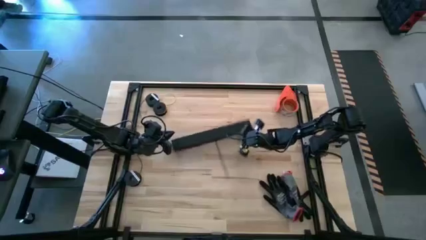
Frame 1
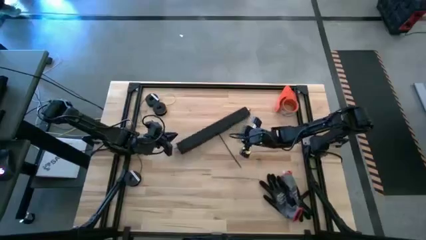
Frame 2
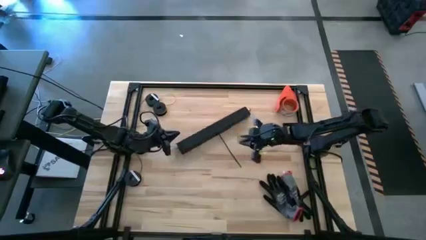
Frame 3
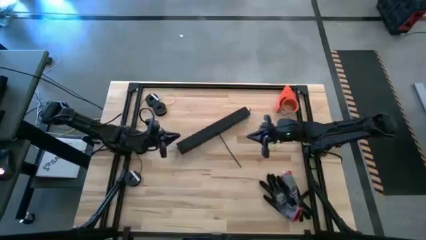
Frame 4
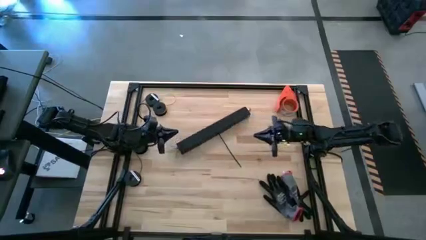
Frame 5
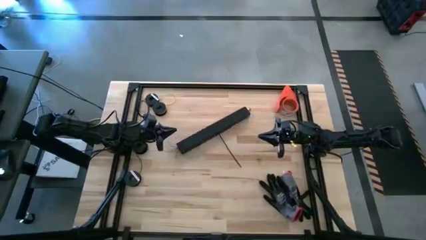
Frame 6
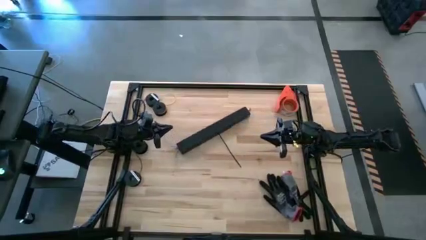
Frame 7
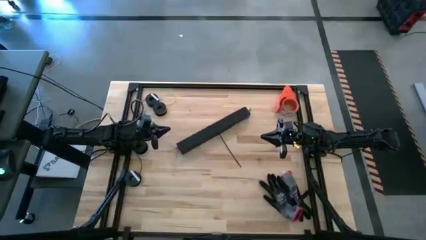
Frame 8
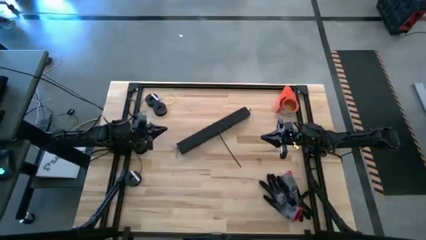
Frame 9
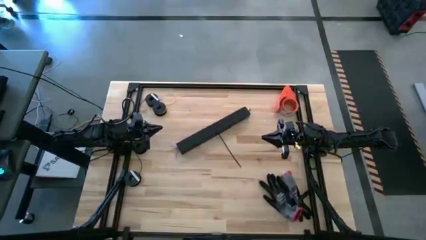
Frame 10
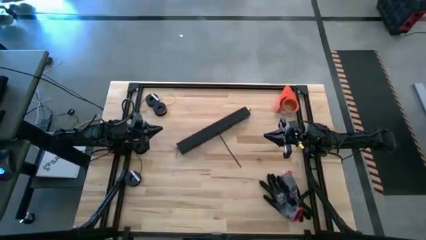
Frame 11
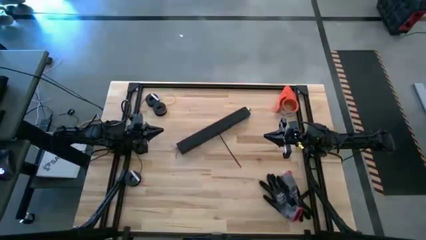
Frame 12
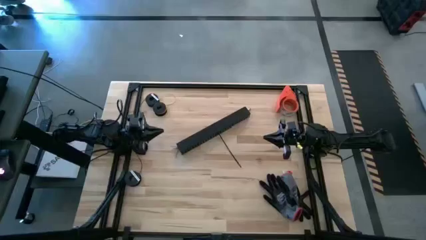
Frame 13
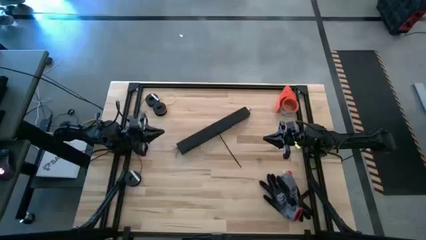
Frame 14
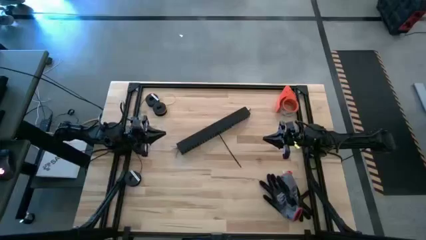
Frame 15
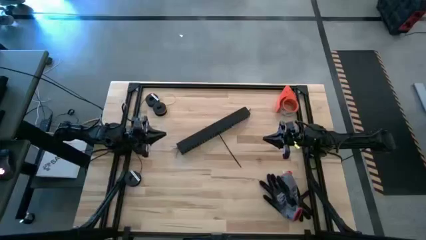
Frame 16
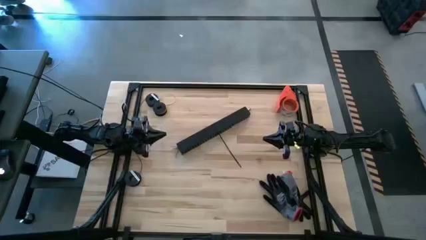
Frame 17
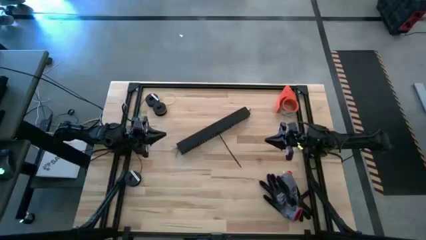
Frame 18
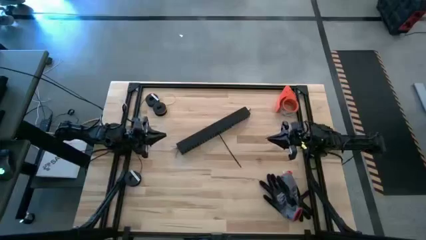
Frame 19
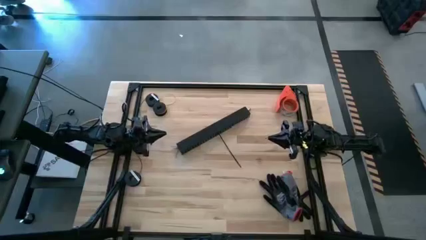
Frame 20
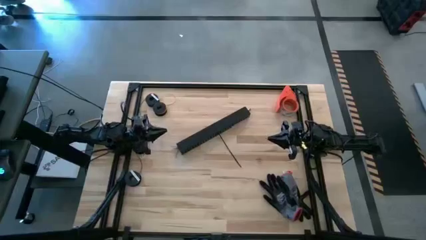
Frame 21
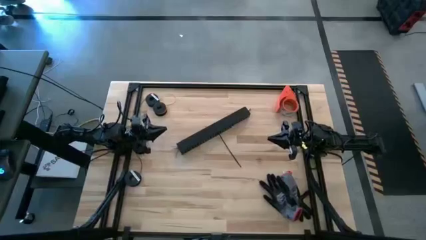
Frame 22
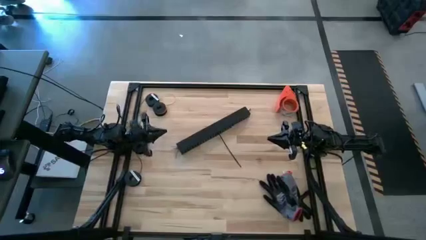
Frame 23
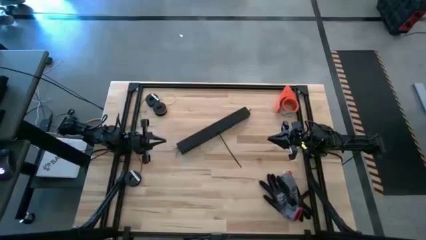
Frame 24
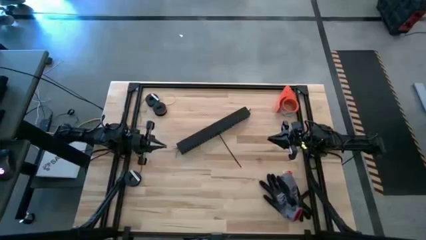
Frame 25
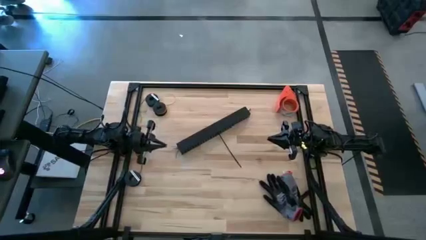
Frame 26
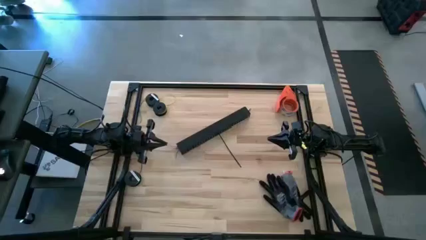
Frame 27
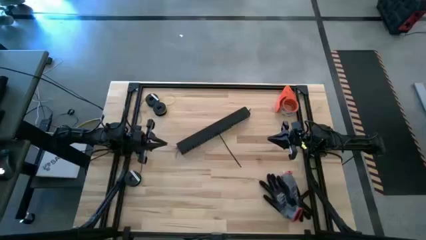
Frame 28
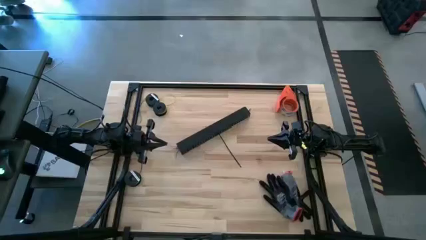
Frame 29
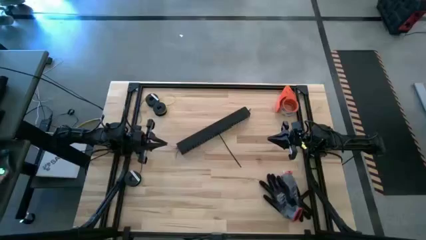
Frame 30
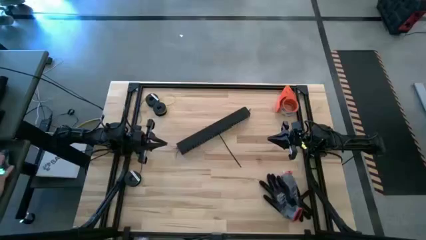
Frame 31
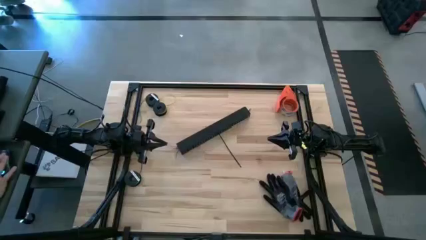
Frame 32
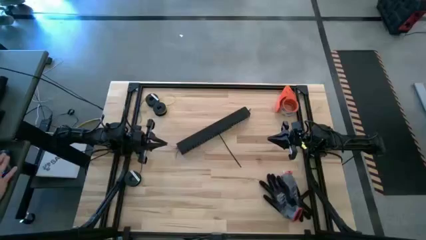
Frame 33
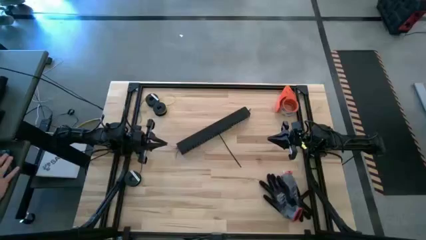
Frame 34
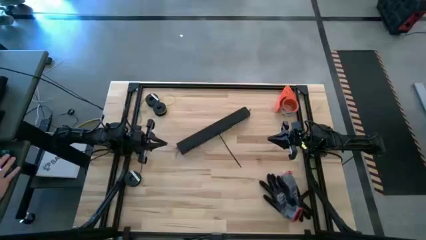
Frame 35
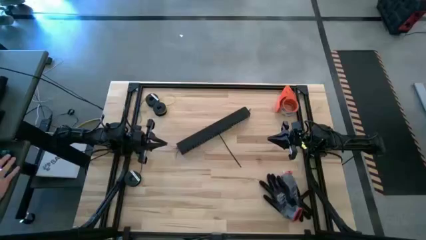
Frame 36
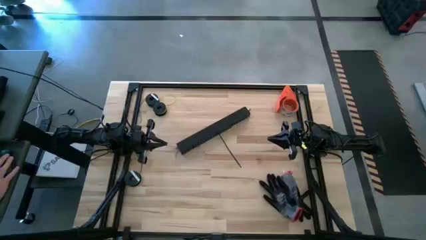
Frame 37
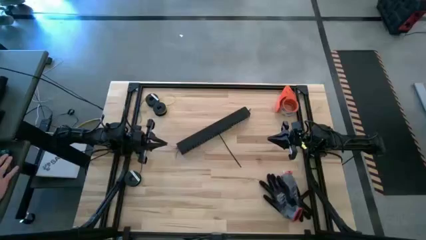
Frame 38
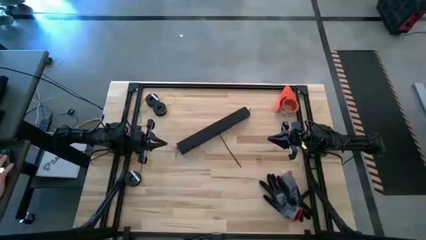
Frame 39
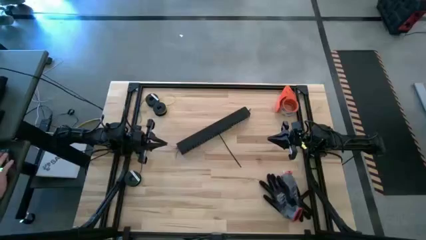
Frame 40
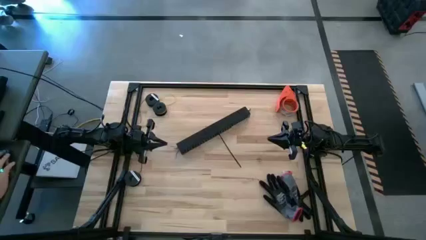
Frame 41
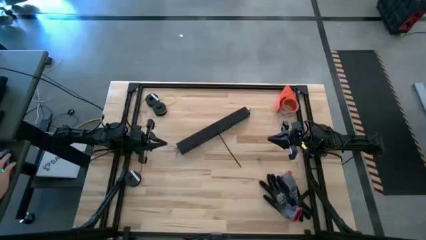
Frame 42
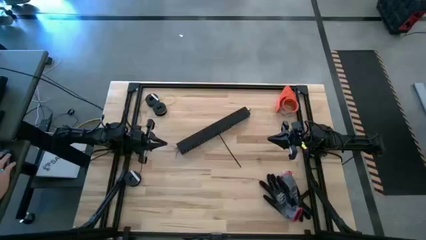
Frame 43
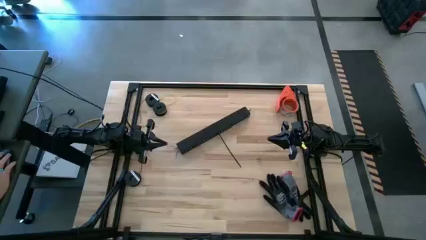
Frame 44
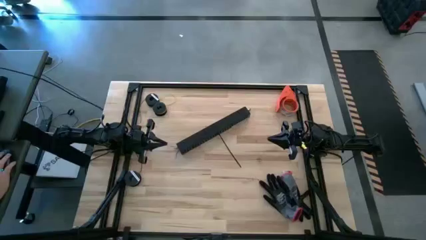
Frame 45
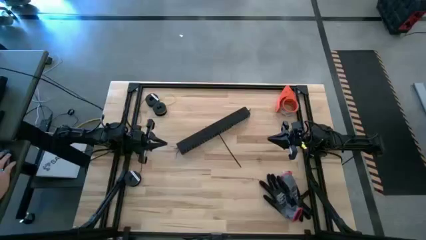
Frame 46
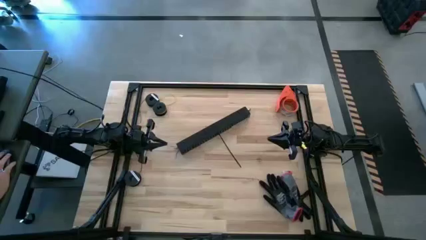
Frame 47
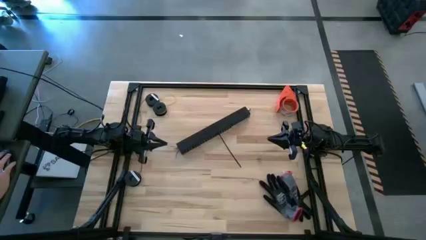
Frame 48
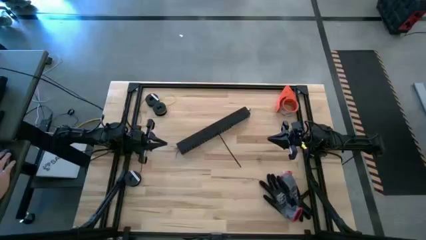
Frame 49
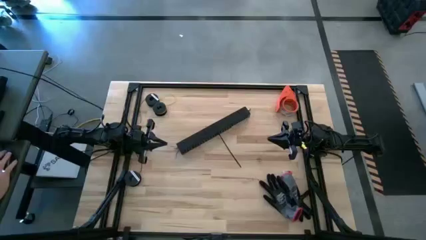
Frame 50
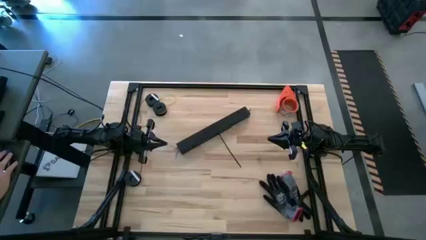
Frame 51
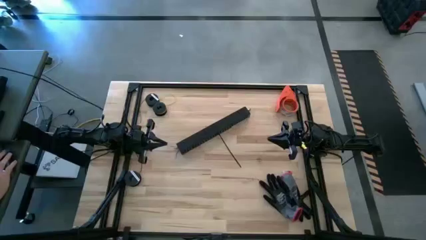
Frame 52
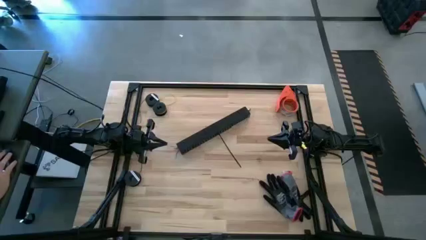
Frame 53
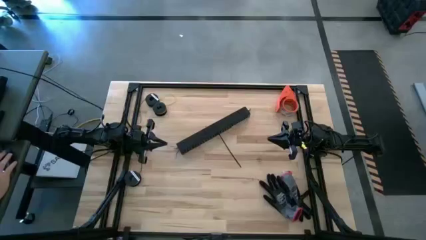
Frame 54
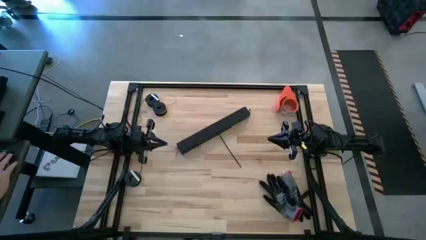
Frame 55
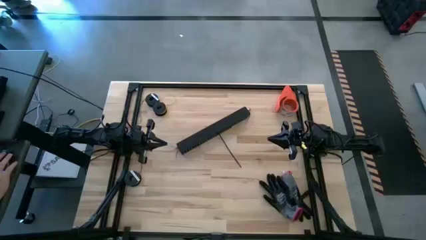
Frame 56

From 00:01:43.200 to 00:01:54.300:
Task: Ziptie cables
Return to Home Position

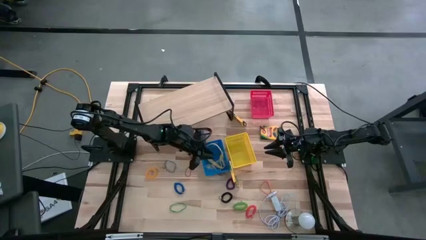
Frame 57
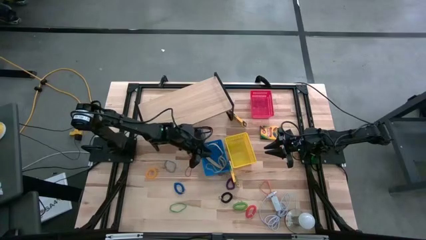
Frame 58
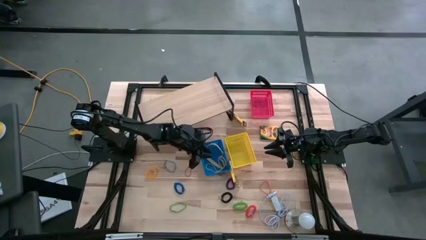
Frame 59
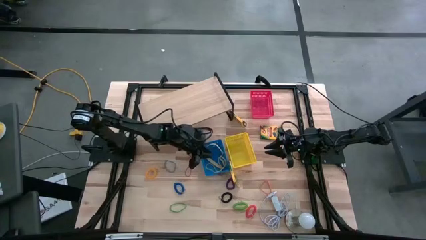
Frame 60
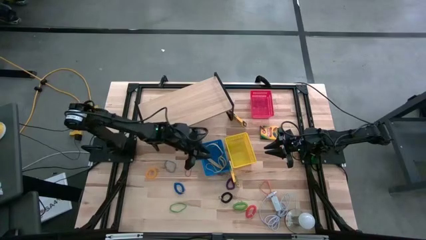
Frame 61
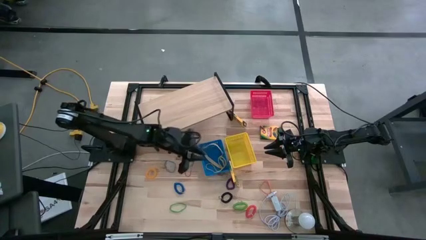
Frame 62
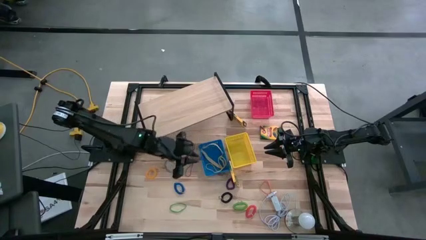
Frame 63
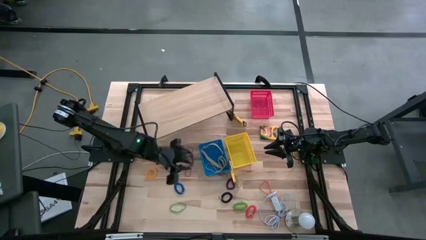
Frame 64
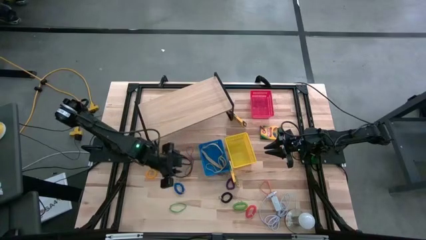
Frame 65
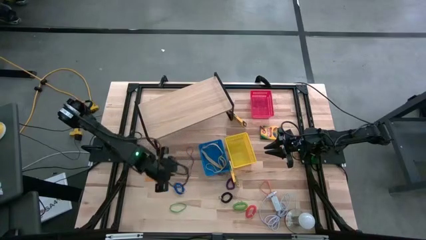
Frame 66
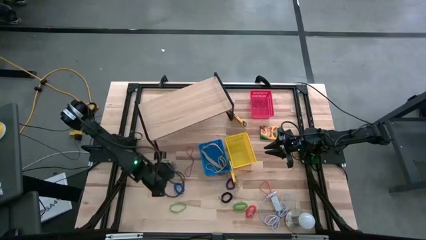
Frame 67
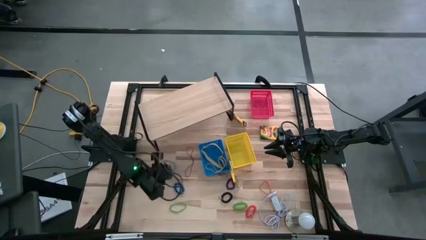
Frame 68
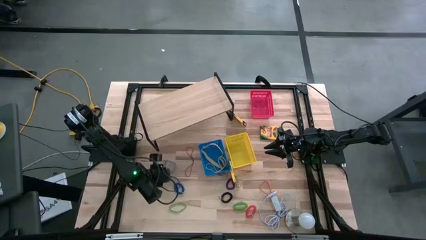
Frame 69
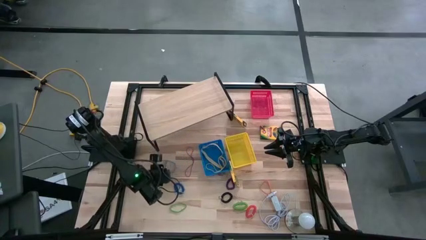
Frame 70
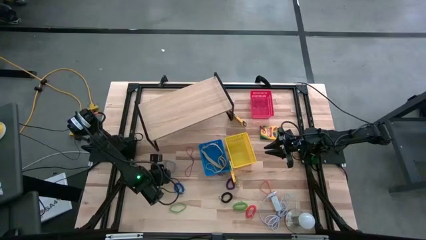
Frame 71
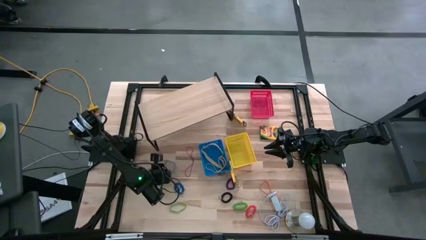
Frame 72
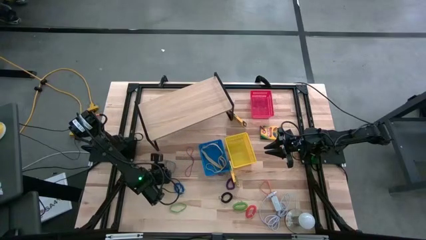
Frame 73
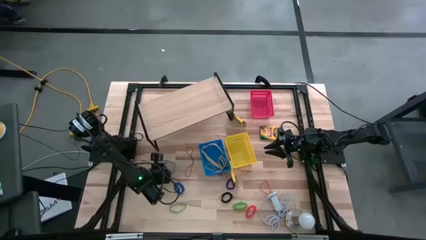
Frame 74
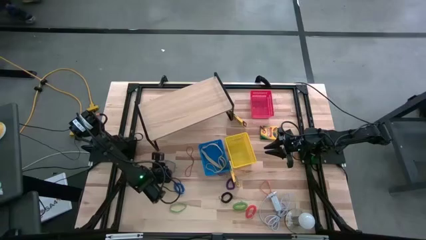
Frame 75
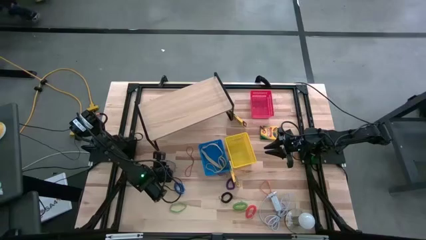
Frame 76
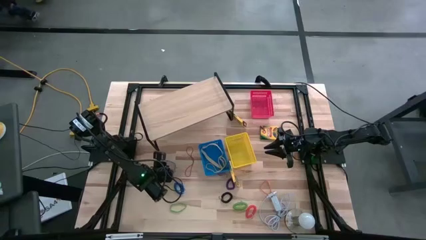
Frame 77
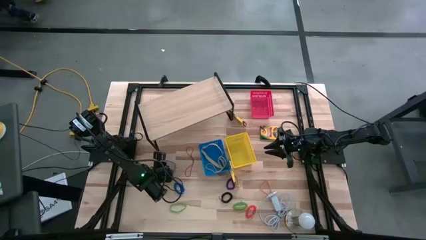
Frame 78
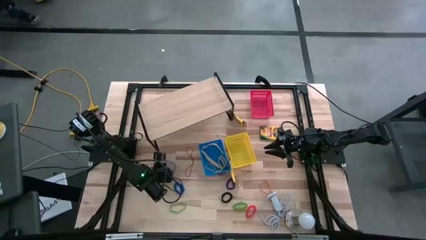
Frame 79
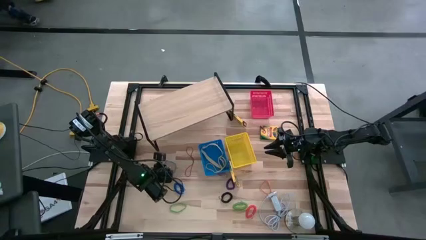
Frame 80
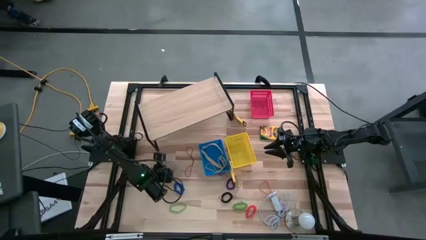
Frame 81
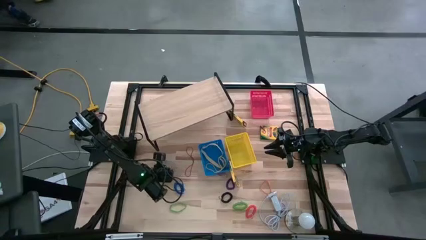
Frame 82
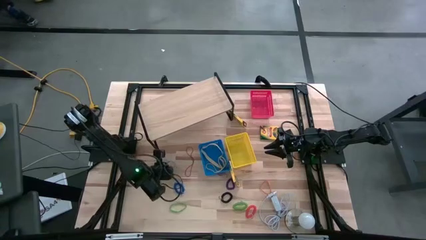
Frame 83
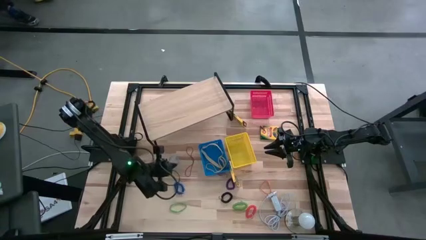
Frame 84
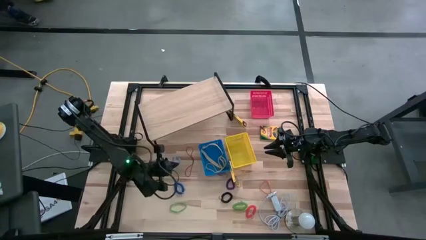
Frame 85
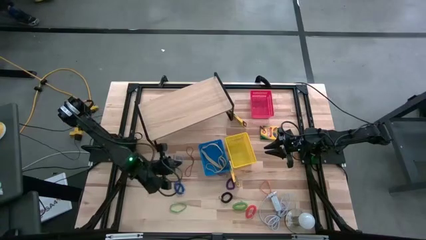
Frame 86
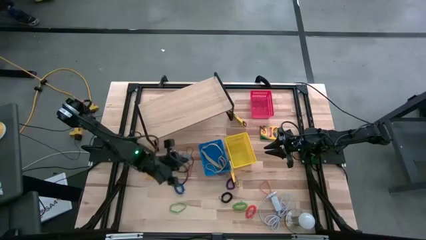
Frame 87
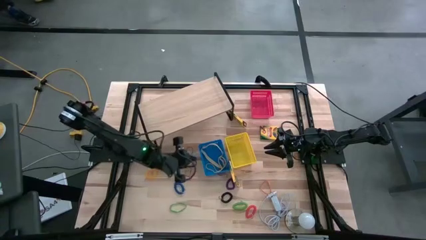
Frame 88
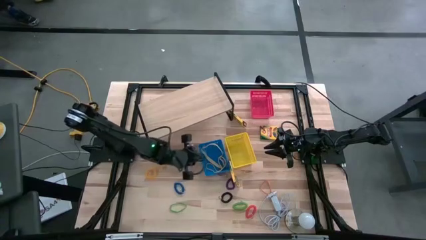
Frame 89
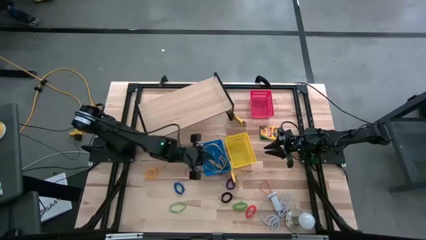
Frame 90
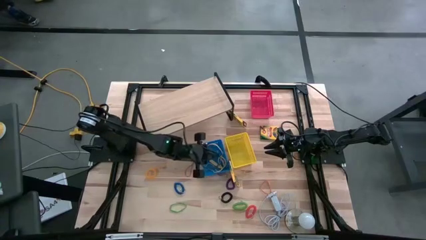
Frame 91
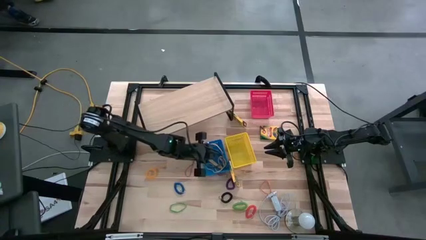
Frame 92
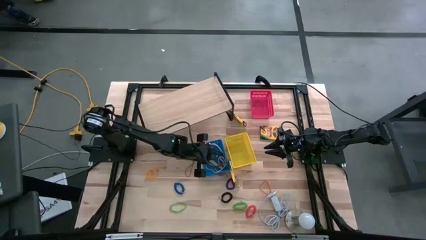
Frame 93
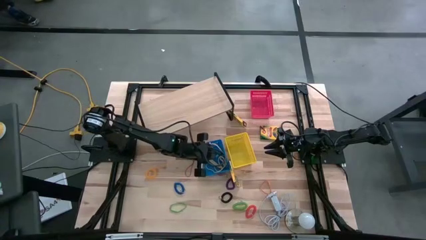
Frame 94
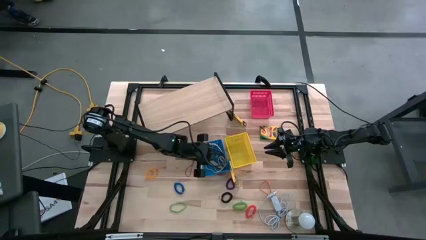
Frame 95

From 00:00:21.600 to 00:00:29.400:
Task: Pick & Place Office Desk Supplies
Put the blue rubber band into the blue bin
